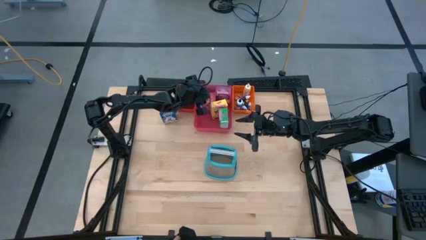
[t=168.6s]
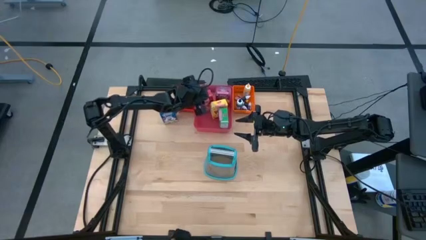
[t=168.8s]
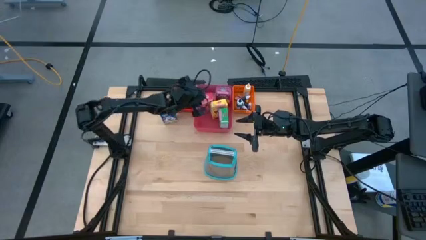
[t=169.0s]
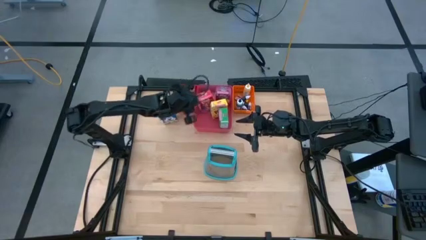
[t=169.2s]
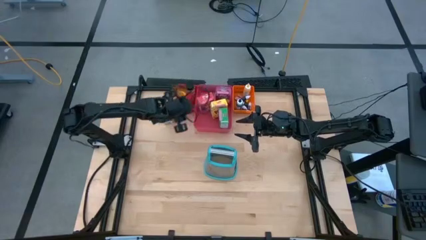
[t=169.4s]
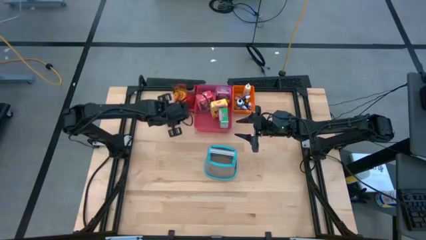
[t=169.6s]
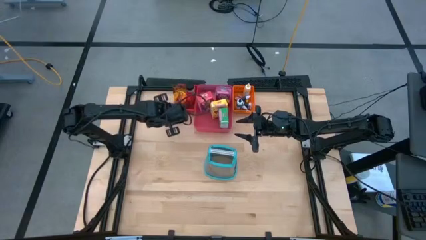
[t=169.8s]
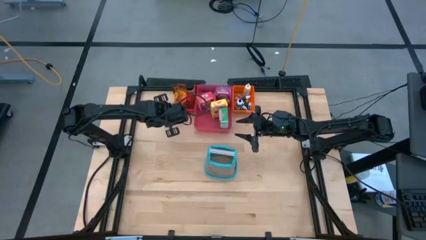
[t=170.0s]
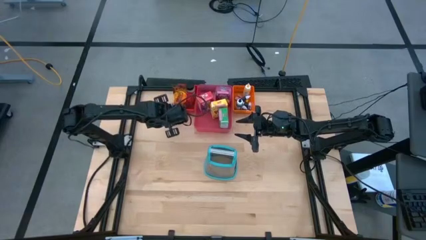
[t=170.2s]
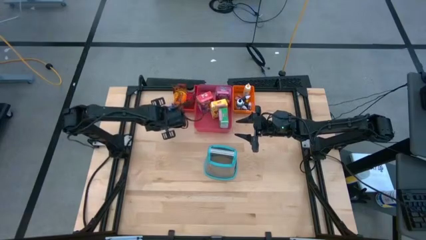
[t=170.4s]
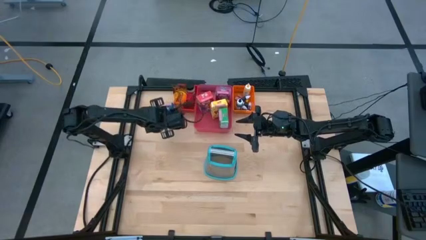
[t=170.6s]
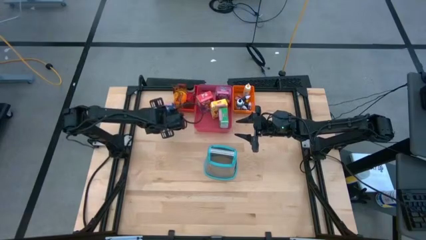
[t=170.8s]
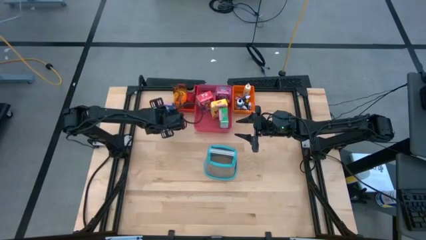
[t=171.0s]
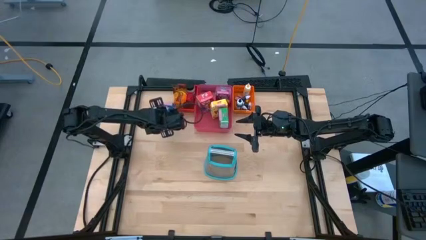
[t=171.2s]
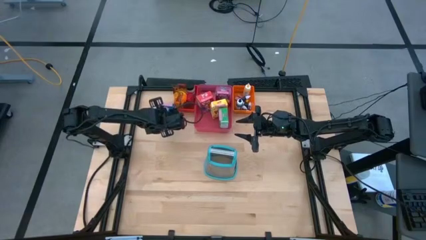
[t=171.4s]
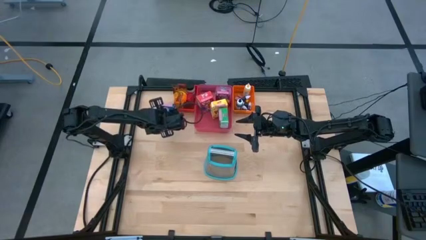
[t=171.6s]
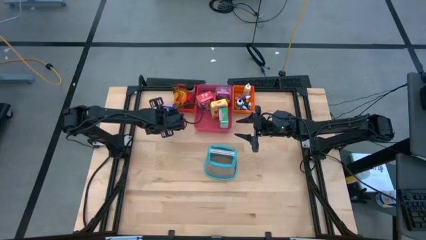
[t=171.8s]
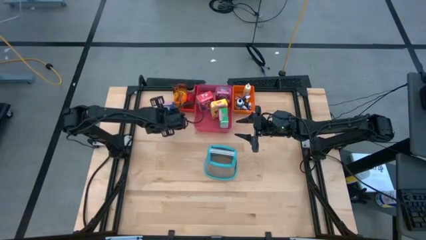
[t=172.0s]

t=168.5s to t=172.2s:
Task: Pick & Place Kitchen Items
Put the blue cereal box into the pink bin

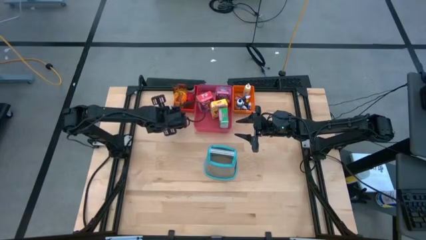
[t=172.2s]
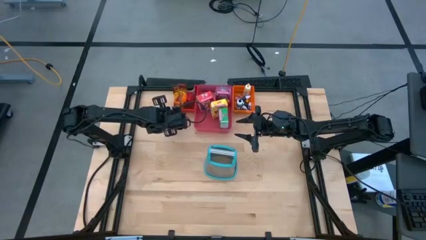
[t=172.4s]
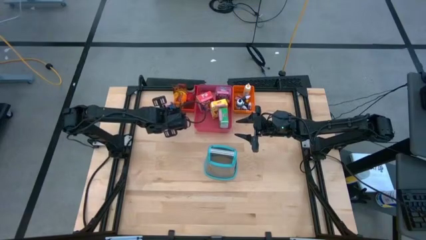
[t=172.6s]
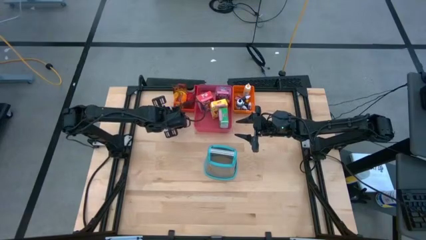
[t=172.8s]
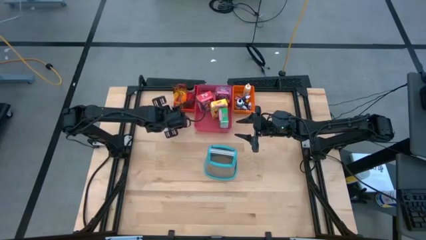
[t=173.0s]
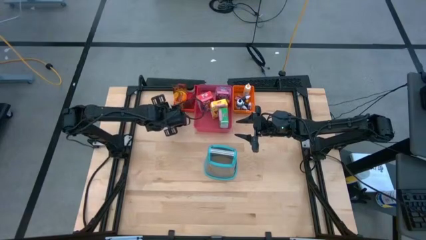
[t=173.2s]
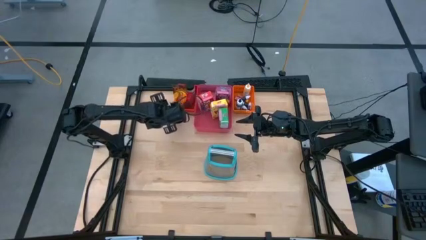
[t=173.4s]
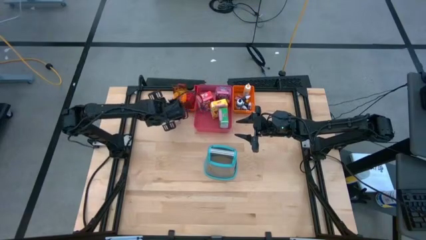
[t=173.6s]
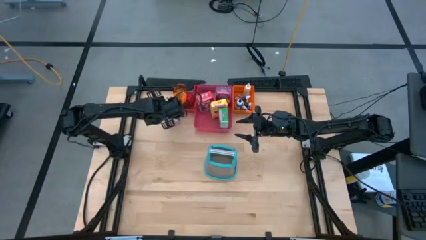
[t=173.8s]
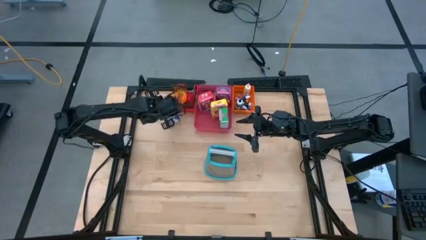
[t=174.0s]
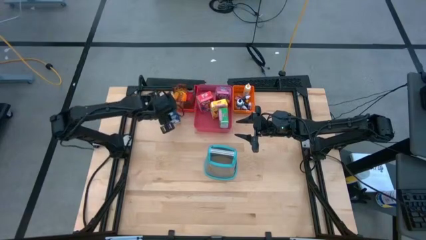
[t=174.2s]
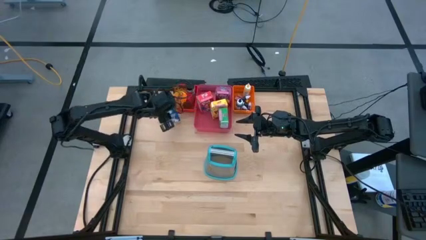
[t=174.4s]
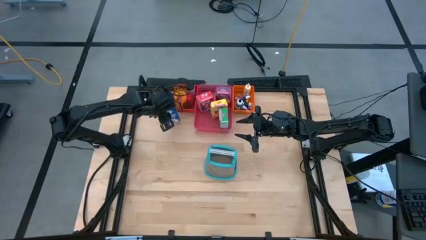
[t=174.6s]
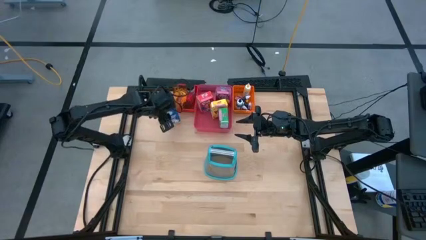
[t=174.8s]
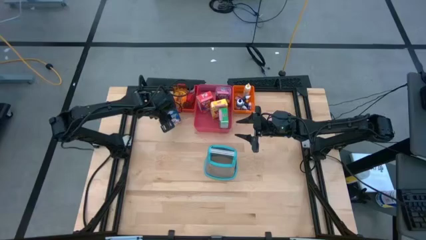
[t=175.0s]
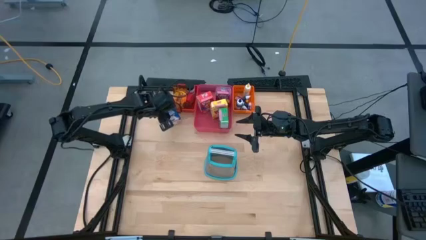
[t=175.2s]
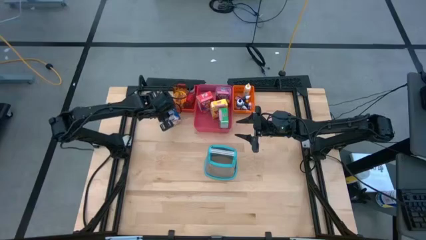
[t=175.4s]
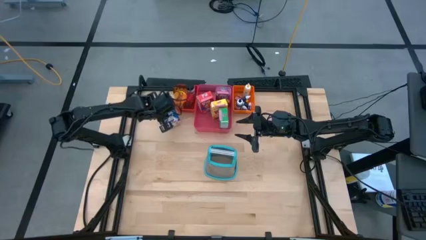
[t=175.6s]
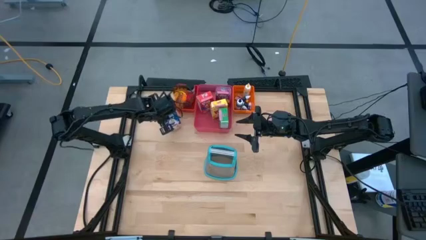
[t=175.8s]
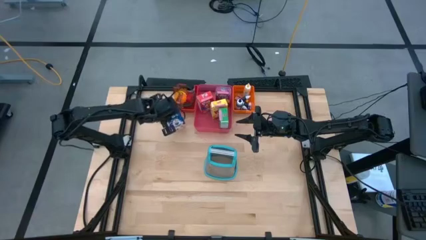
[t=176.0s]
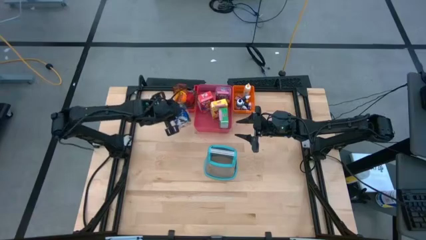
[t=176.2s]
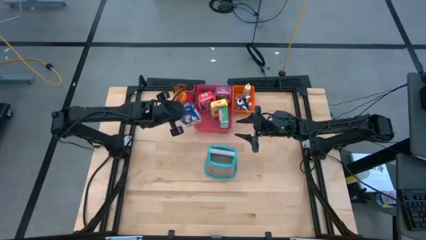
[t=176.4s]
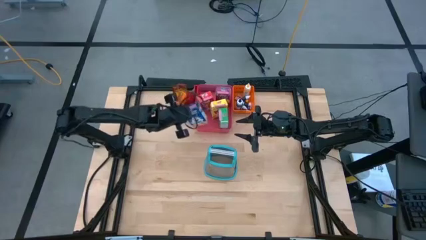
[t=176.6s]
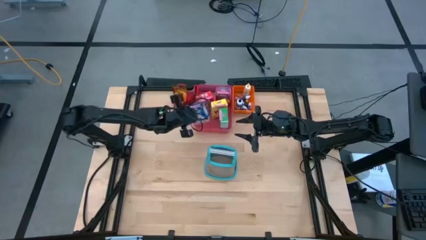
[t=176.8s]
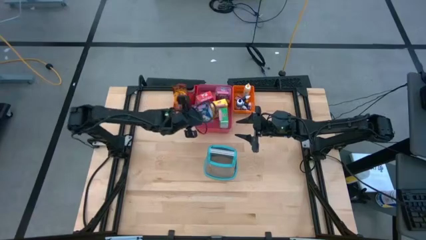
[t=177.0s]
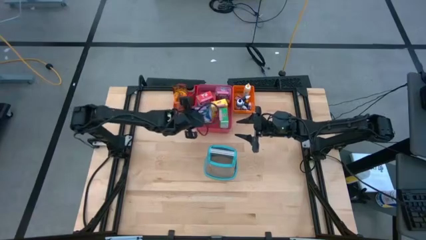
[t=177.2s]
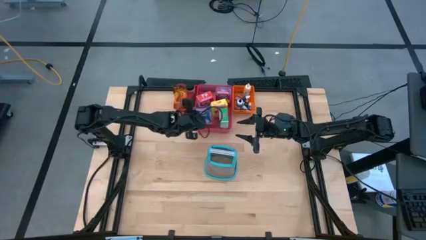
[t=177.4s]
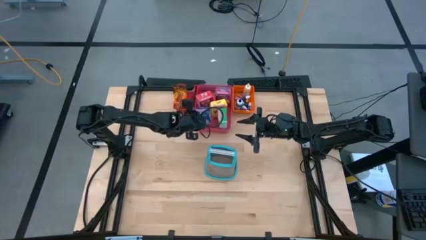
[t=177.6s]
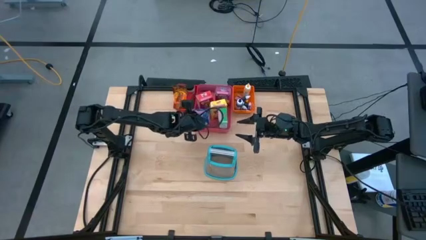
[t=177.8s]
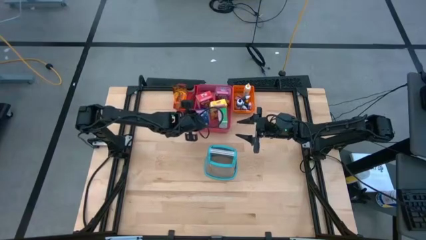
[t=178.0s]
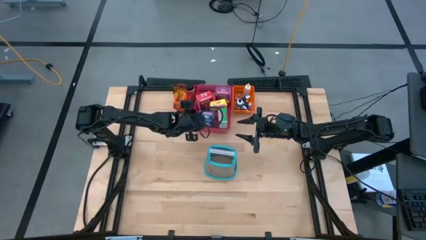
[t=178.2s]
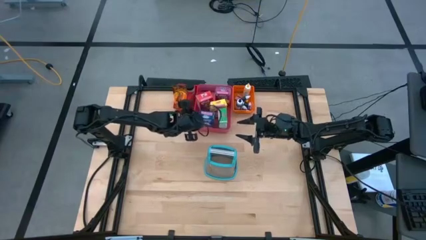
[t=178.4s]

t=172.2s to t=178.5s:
Put the blue cereal box into the pink bin

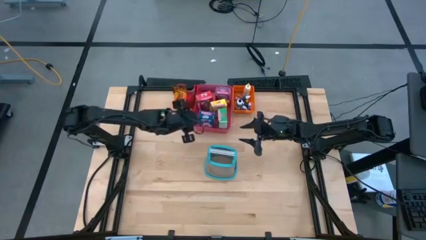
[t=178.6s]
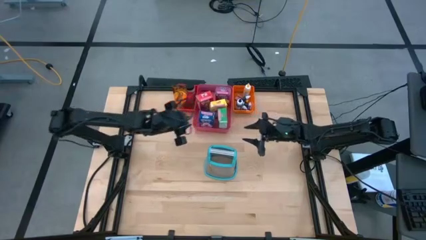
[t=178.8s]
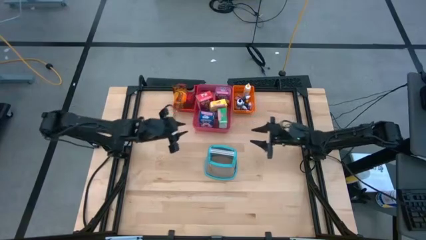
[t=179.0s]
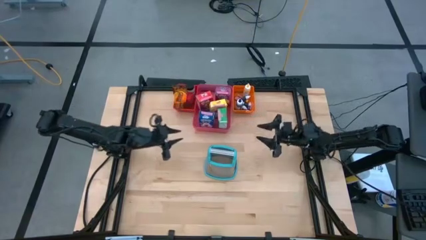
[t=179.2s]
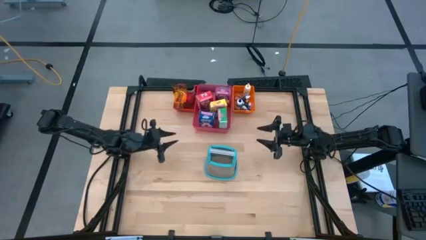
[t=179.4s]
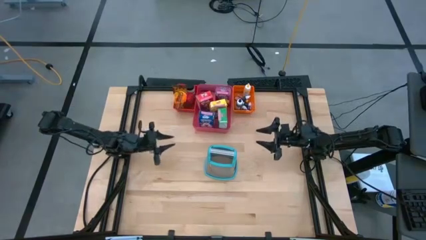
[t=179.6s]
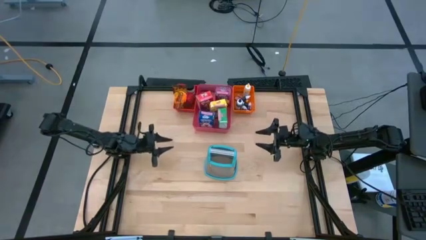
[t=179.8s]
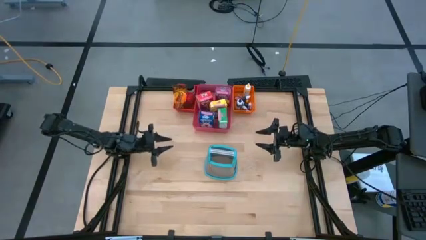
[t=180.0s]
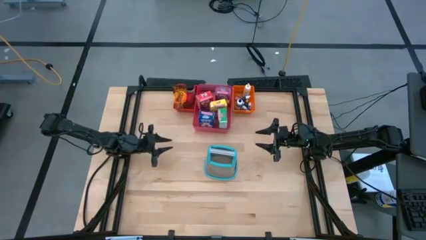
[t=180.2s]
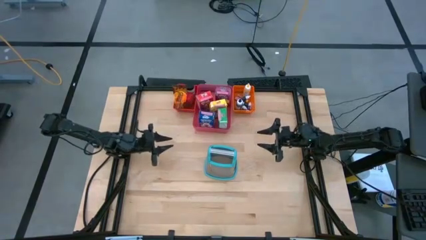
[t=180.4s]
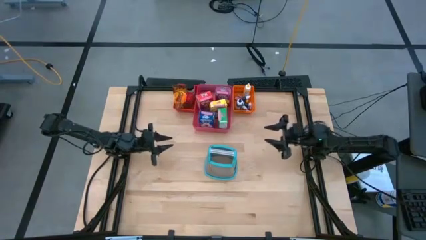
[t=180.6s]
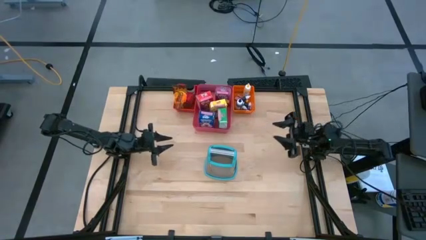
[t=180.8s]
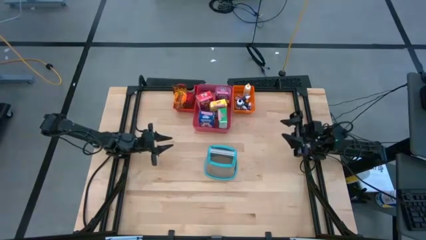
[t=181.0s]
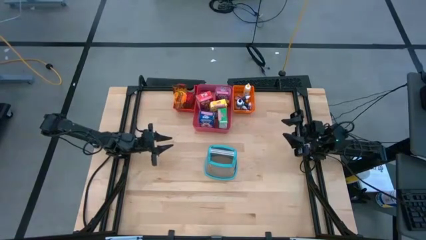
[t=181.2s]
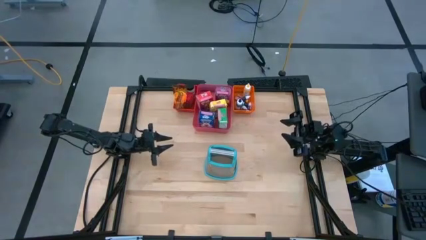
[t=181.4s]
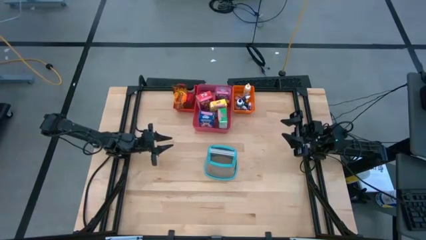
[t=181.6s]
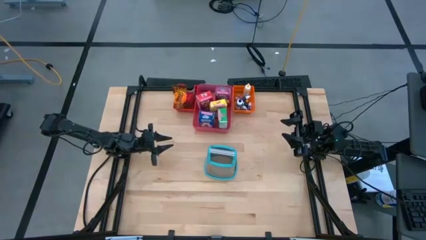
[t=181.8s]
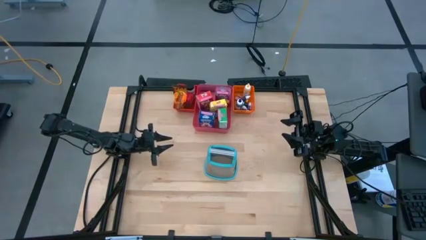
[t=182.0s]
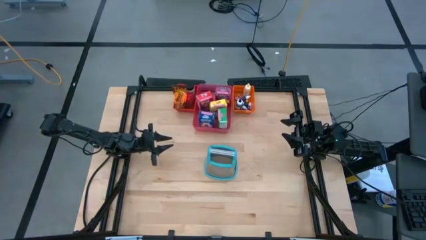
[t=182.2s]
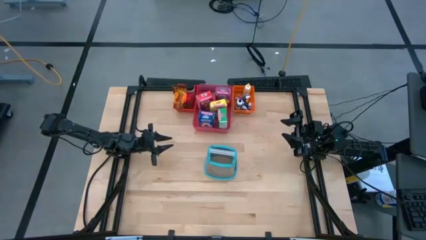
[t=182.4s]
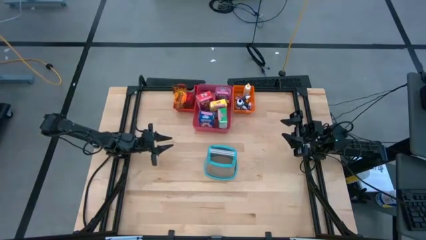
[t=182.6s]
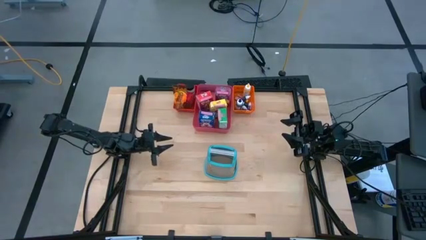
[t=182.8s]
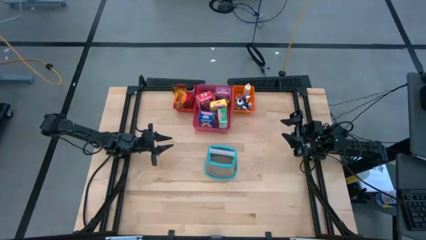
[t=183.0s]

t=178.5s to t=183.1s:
Return to Home Position
